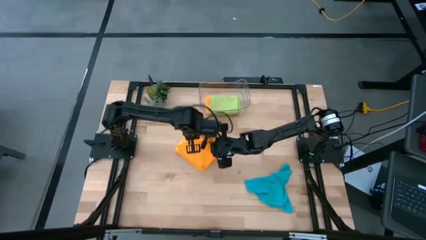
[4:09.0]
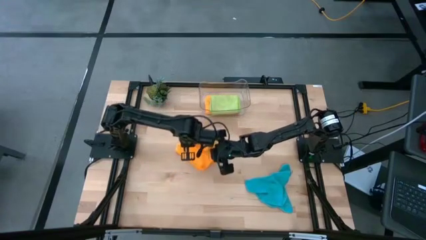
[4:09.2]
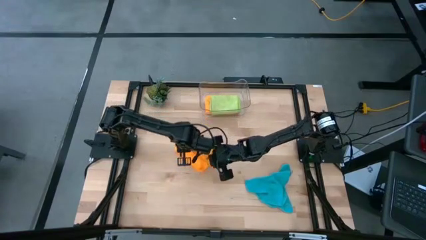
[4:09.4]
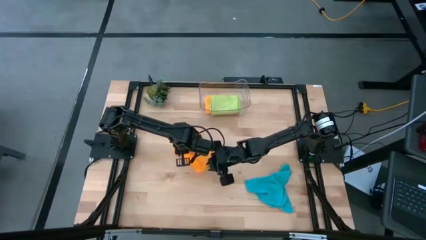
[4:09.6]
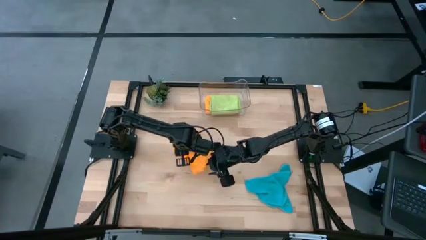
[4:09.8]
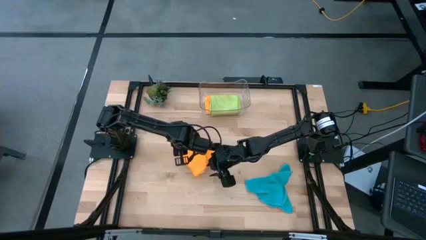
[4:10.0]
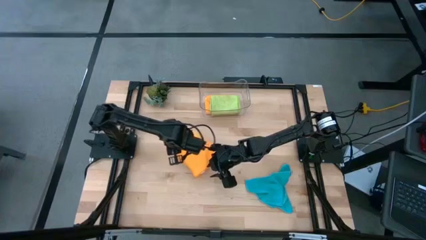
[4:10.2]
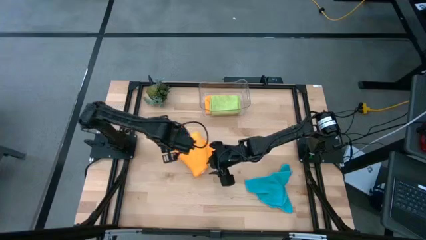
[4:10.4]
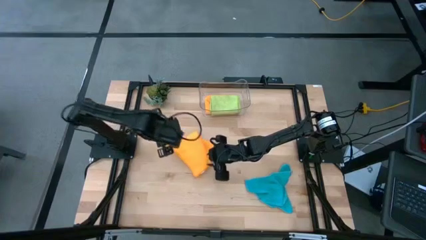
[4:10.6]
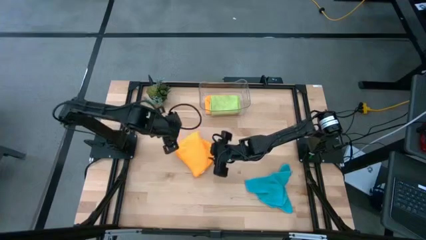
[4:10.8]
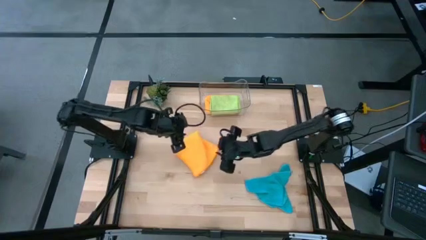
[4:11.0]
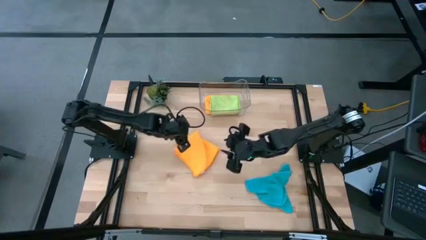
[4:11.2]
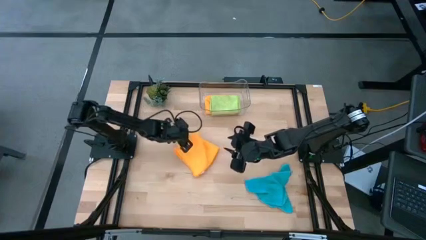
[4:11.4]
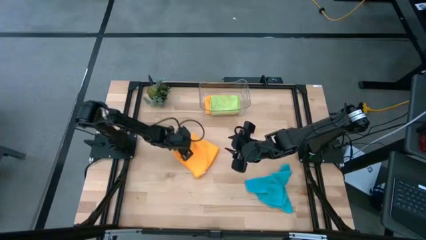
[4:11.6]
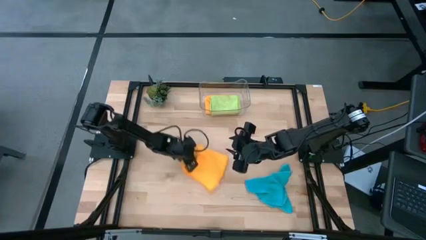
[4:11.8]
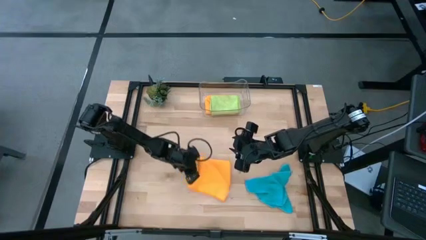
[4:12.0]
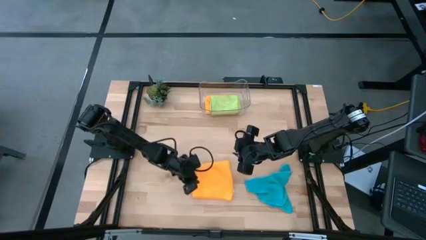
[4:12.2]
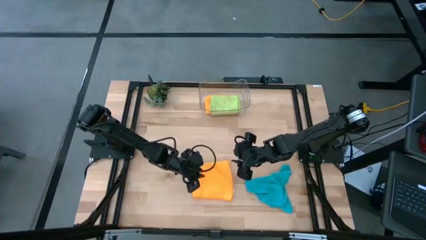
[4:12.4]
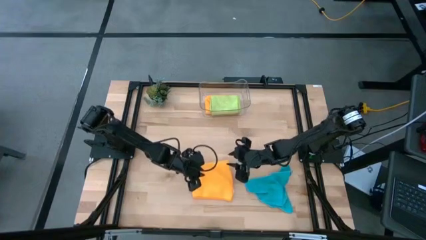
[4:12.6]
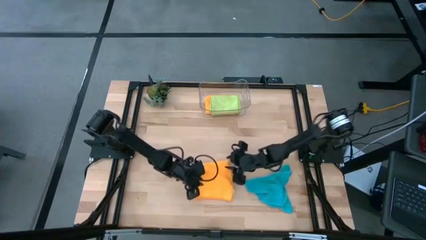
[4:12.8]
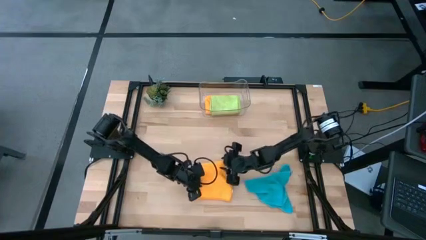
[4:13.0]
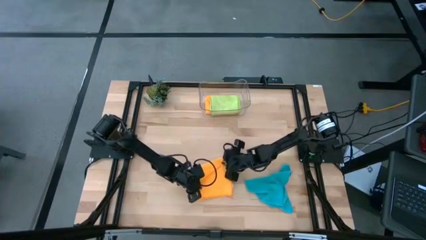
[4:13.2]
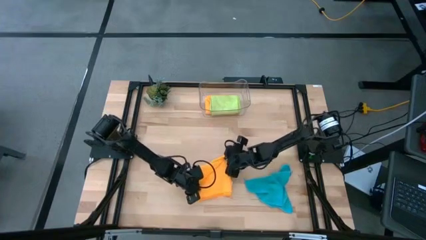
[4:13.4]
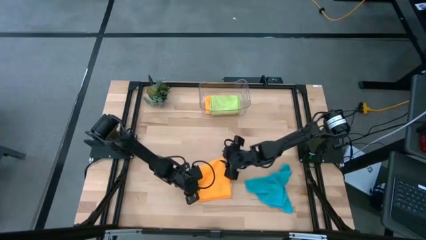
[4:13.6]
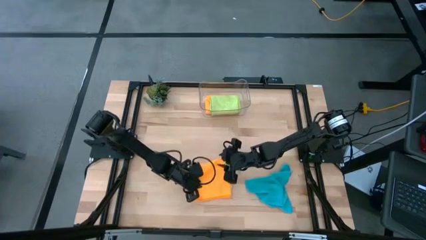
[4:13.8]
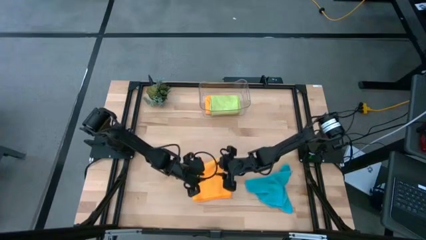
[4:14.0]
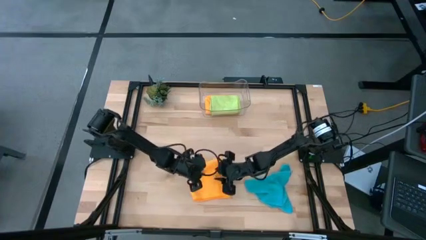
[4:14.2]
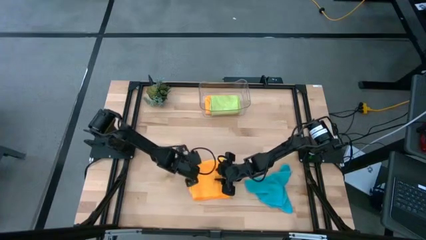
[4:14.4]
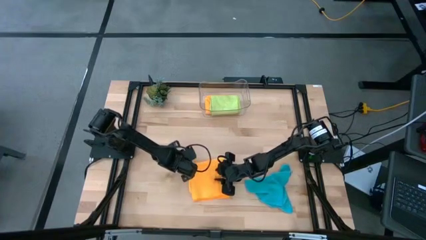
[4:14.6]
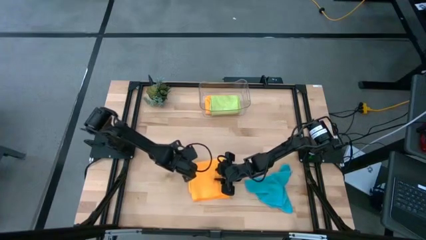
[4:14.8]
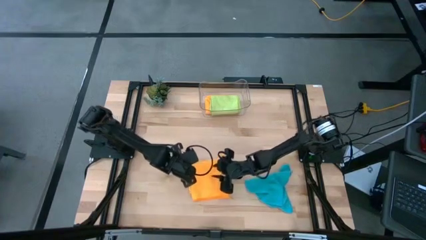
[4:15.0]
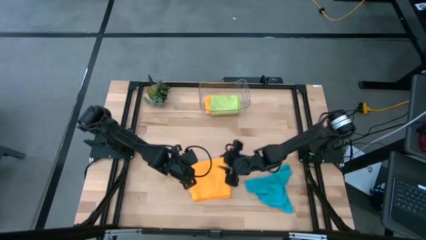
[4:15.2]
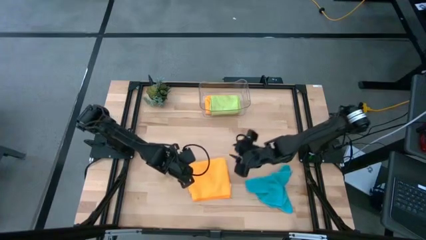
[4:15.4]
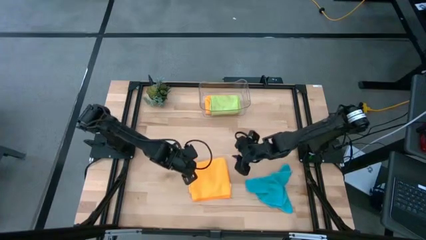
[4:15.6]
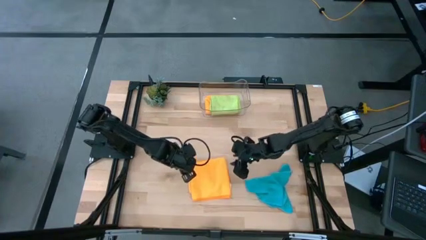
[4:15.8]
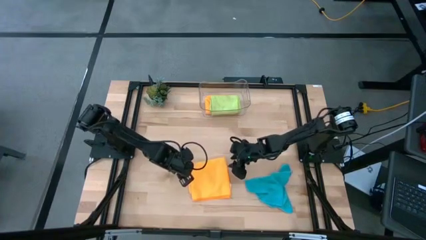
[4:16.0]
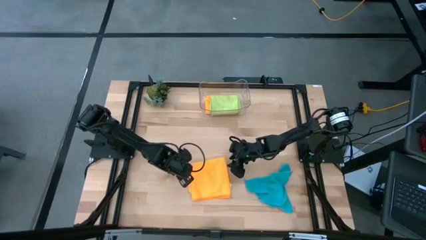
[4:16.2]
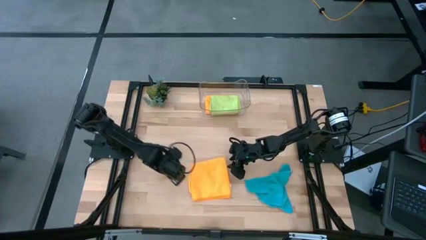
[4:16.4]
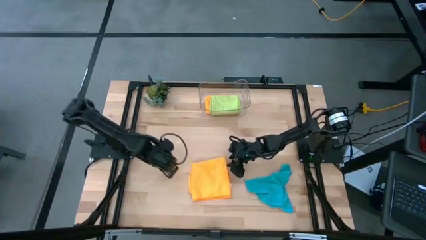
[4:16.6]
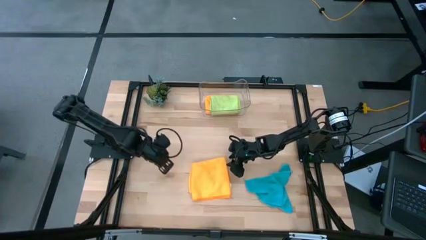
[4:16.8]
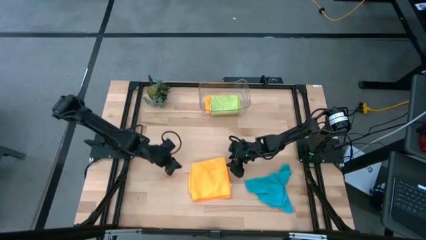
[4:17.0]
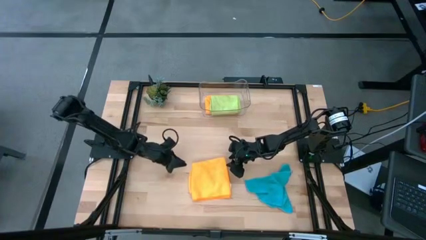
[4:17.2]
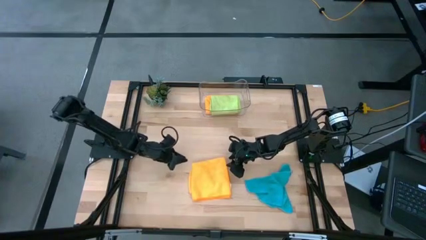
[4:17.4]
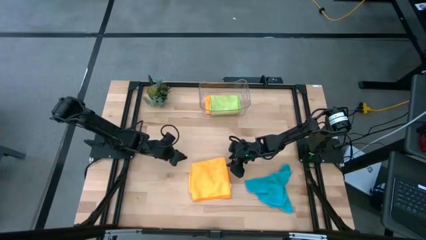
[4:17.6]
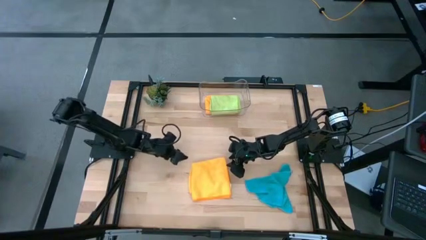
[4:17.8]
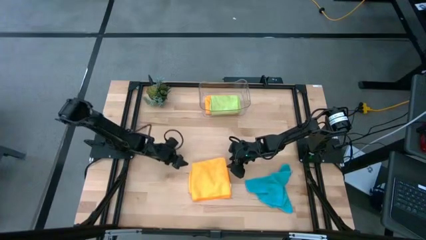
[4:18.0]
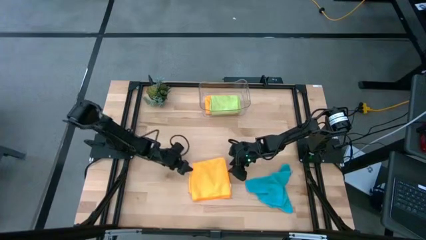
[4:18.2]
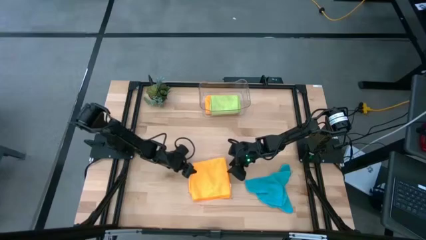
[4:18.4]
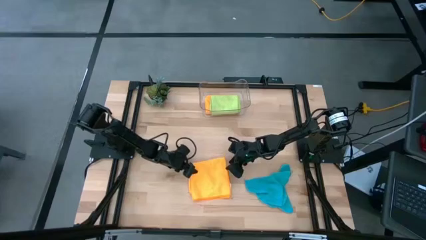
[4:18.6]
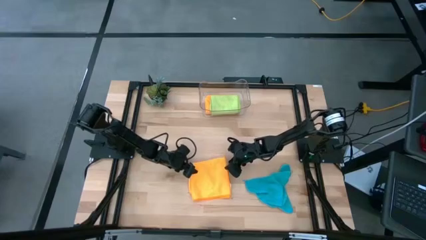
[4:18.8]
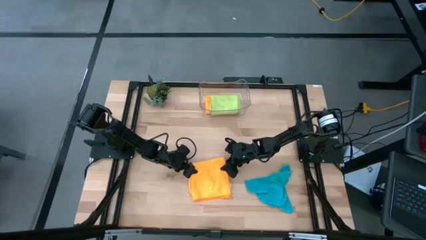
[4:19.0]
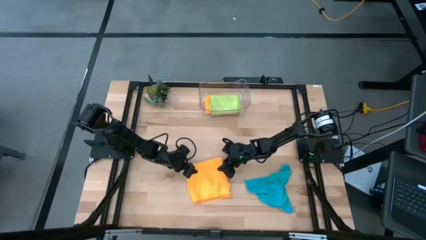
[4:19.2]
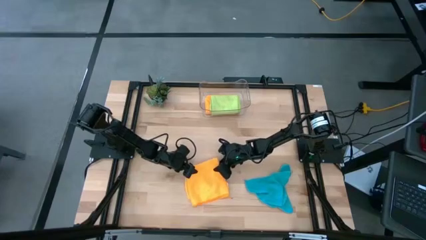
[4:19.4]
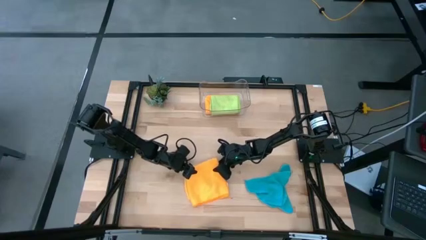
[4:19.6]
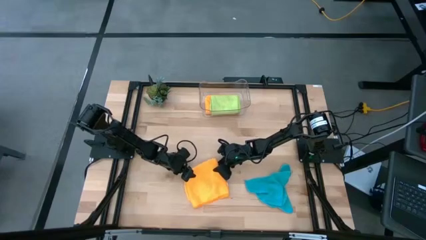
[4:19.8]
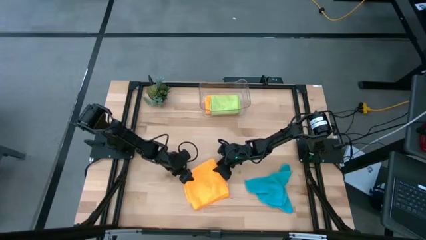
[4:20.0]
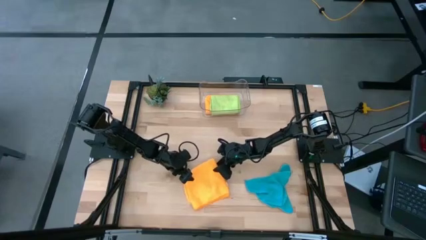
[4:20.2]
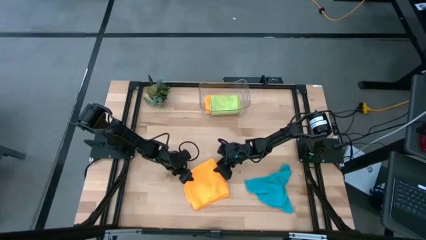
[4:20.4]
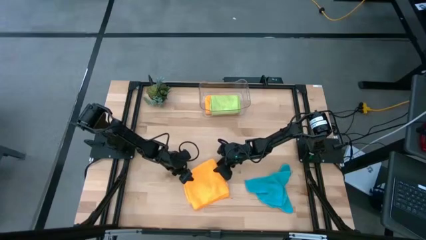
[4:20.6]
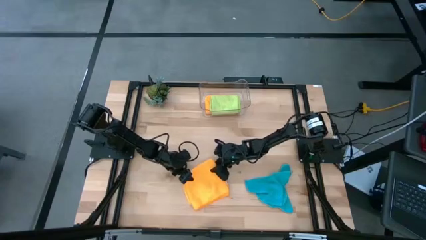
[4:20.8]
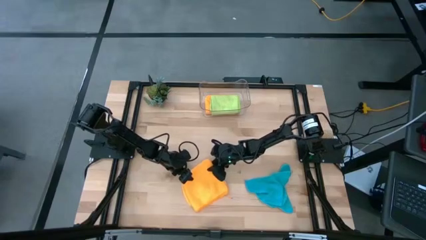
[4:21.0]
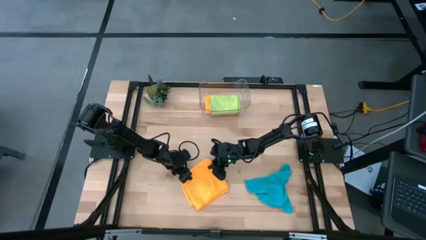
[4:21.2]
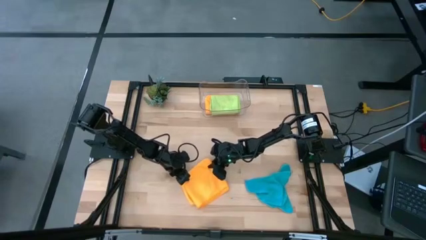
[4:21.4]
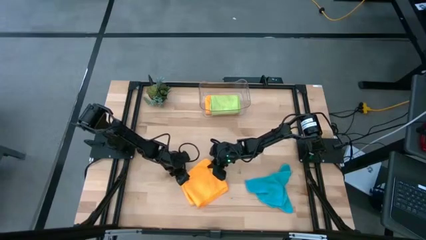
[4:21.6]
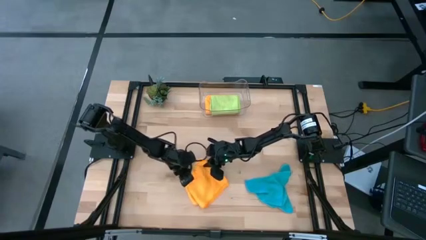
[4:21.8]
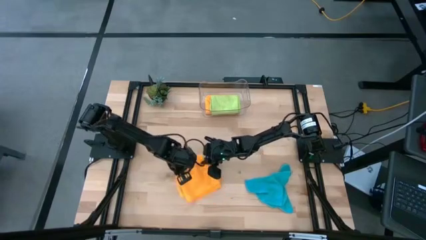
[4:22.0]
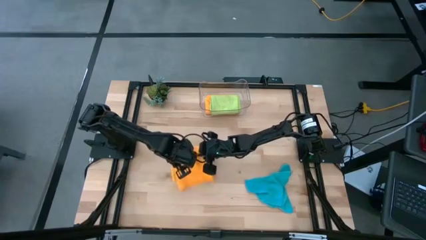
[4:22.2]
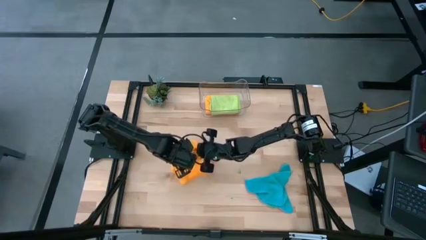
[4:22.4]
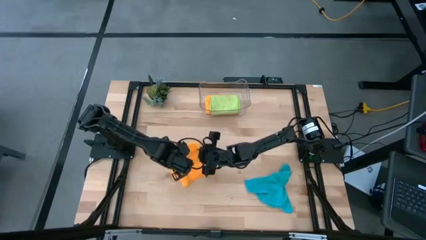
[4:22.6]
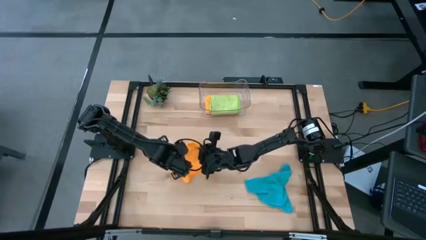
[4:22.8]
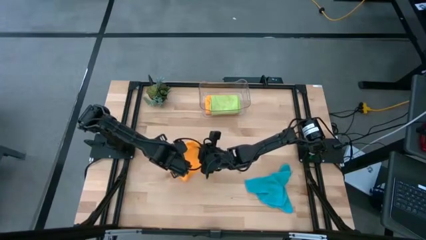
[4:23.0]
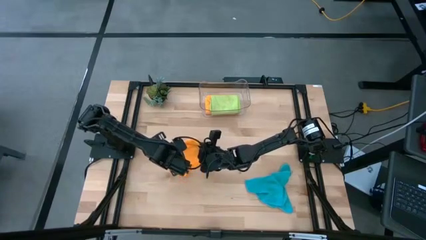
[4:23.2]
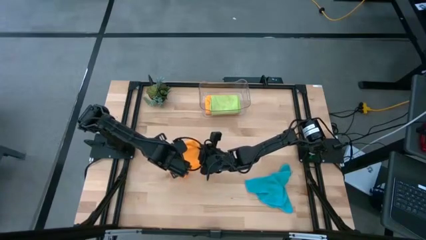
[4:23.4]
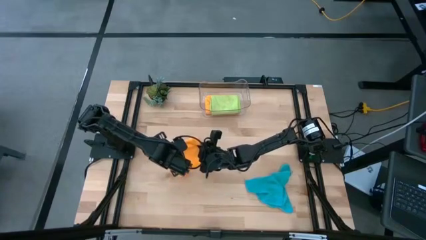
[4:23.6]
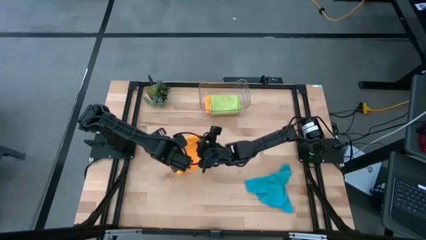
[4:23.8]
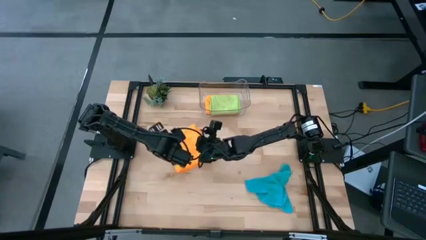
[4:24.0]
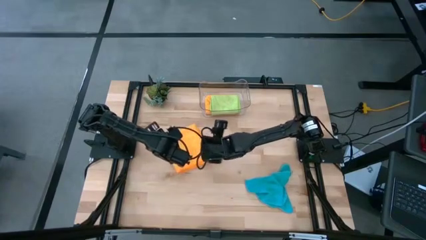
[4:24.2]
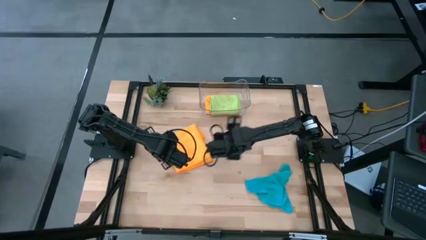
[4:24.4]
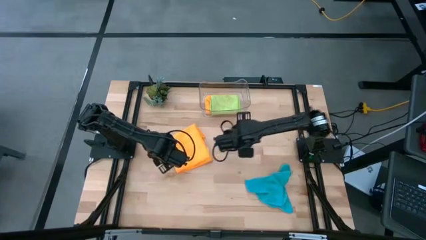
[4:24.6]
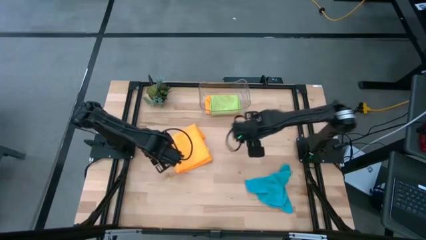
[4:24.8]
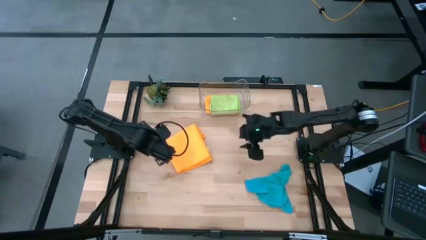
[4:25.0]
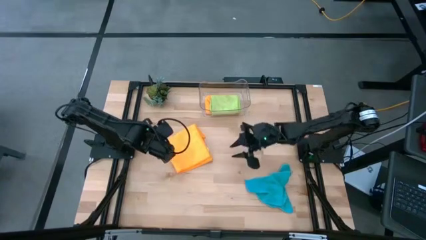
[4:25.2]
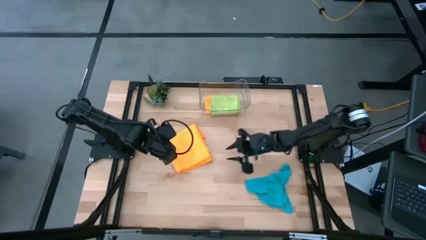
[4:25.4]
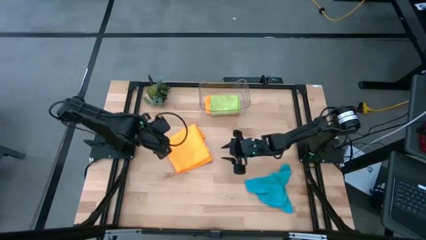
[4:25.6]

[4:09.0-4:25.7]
Task: Fold microfiber towels
Fold the orange microfiber cloth

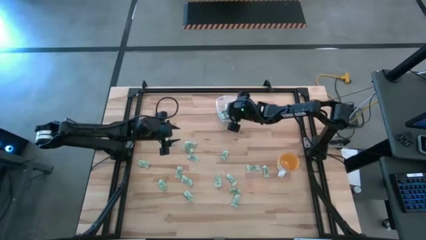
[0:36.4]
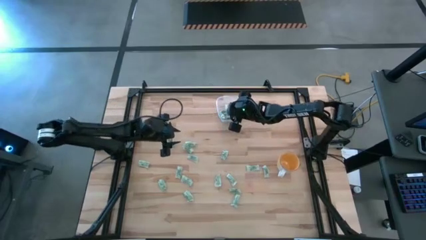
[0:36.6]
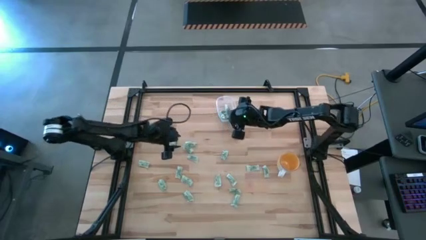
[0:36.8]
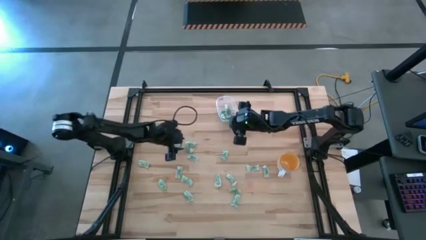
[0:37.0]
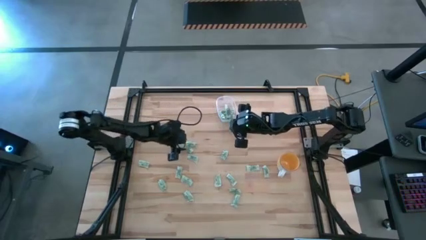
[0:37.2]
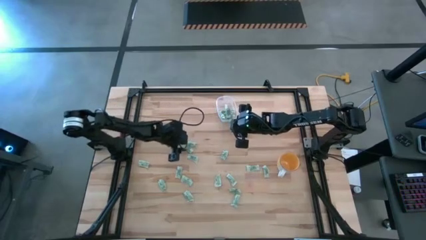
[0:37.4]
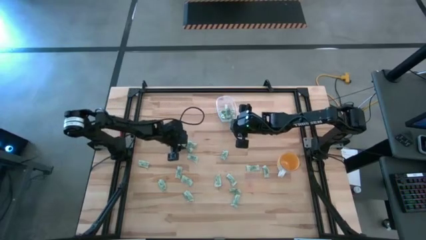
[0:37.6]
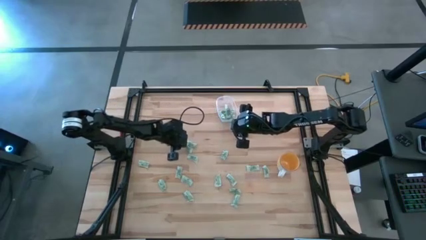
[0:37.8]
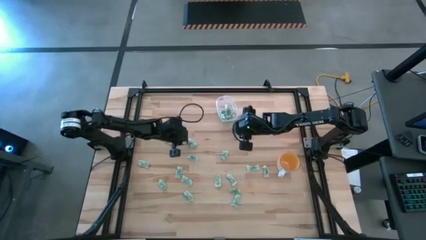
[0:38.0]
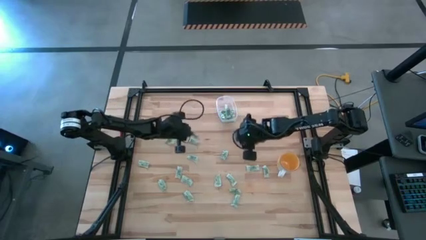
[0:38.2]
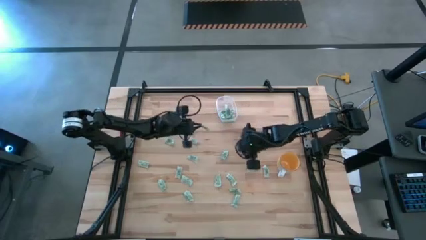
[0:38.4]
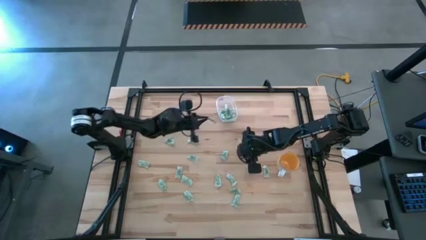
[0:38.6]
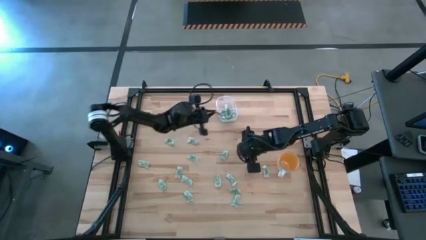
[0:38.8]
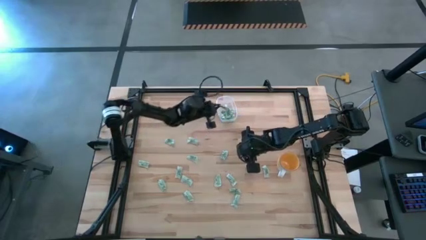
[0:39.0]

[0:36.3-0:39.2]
Task: Pick and place Stevia / Truvia into bins
Put the green stevia packet into the transparent bin
